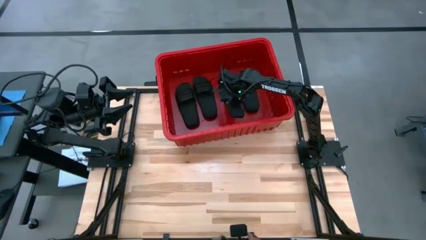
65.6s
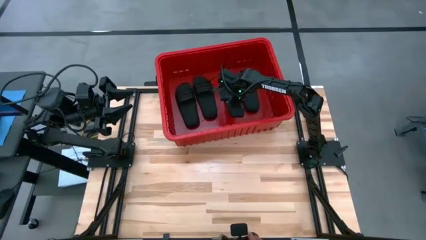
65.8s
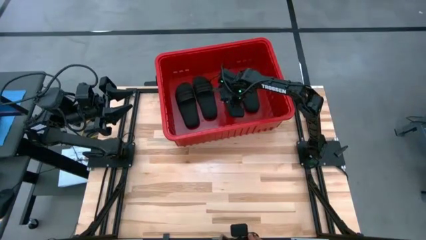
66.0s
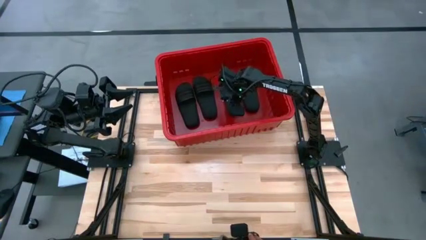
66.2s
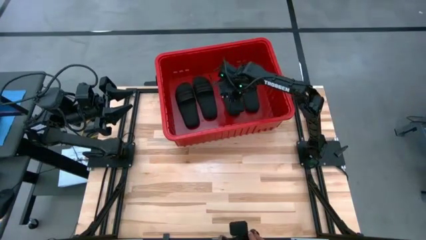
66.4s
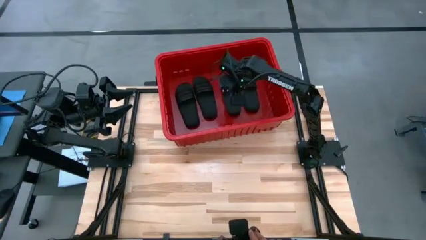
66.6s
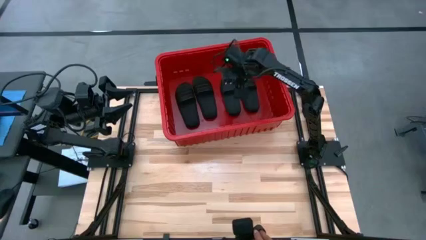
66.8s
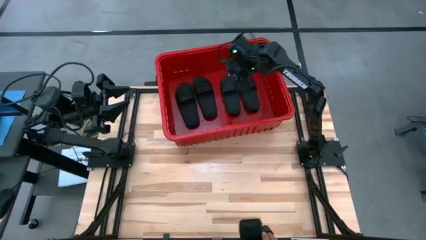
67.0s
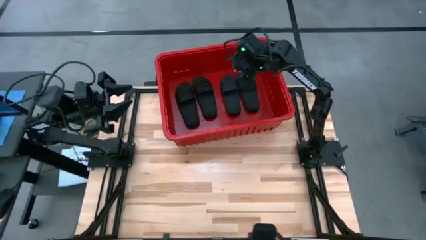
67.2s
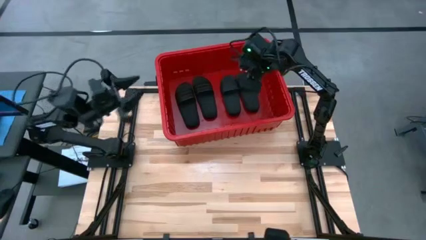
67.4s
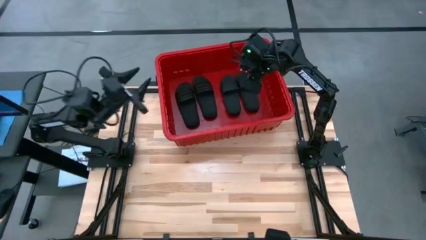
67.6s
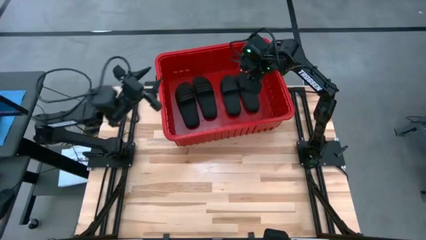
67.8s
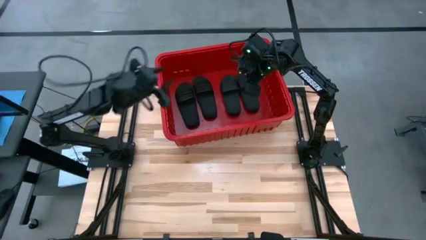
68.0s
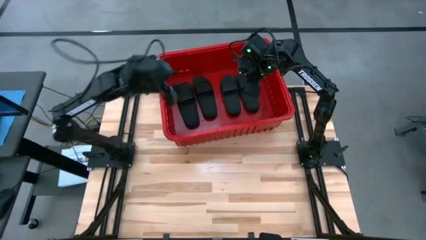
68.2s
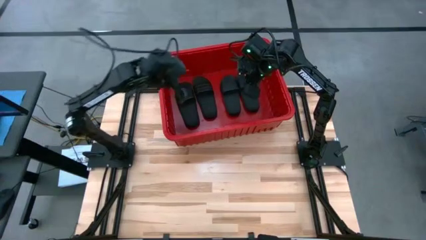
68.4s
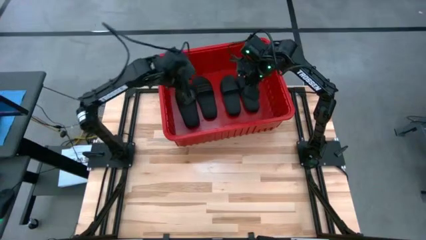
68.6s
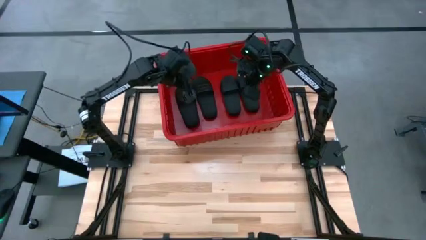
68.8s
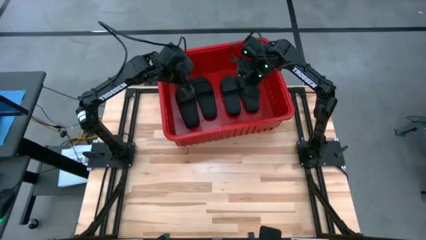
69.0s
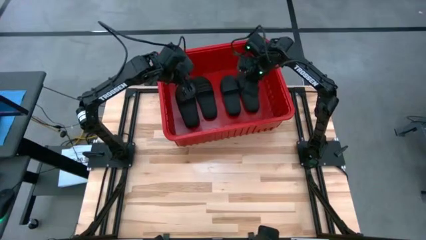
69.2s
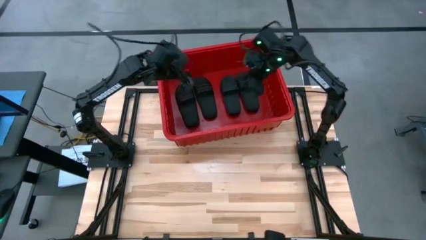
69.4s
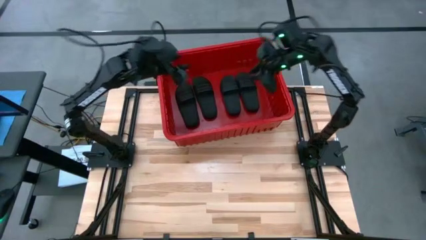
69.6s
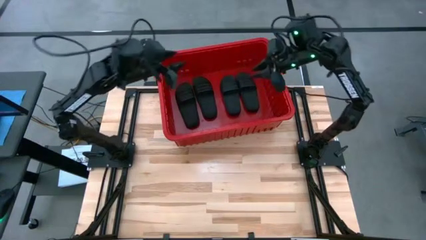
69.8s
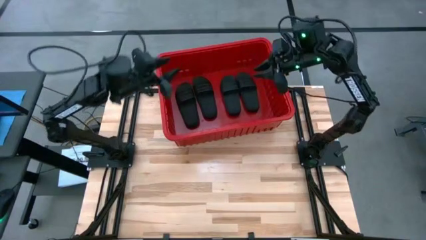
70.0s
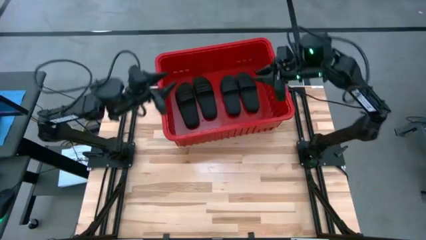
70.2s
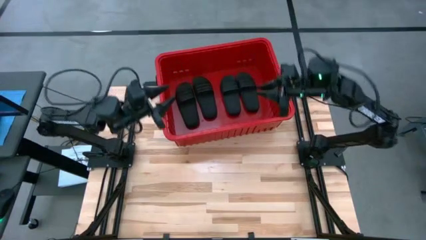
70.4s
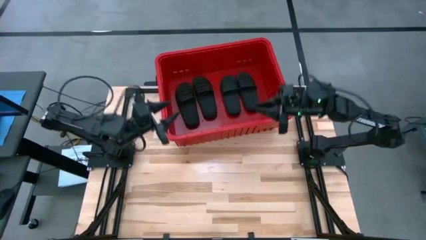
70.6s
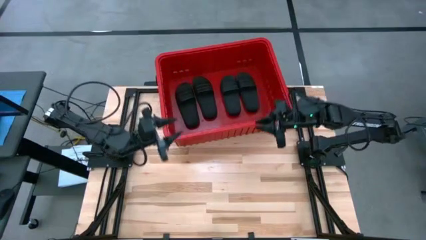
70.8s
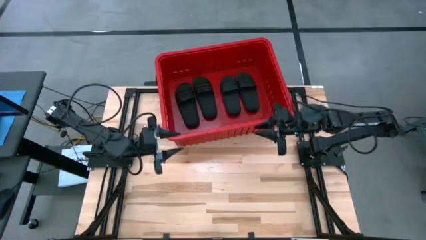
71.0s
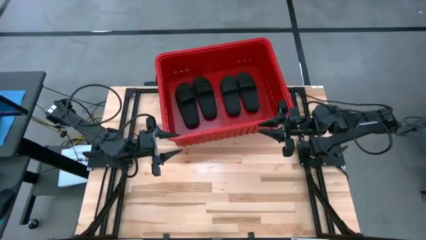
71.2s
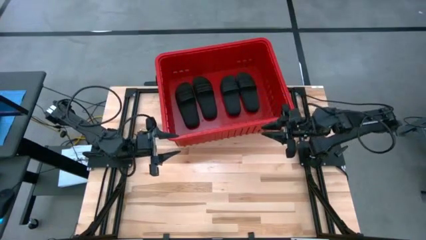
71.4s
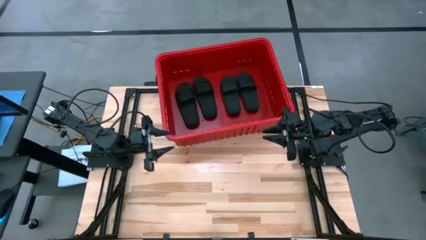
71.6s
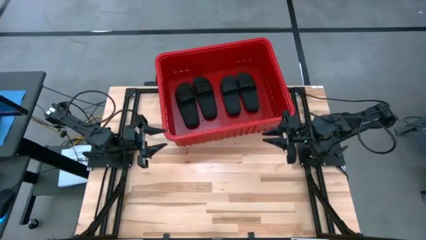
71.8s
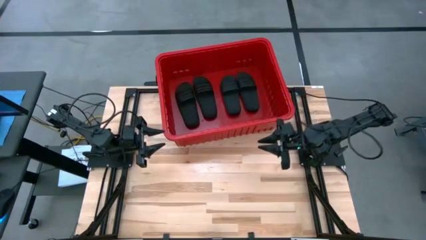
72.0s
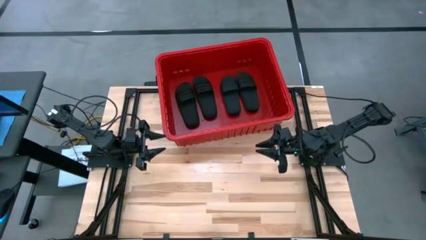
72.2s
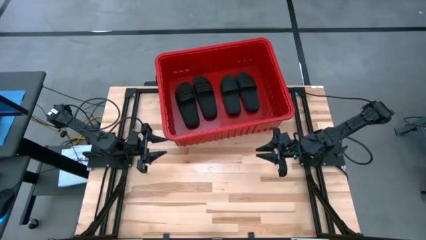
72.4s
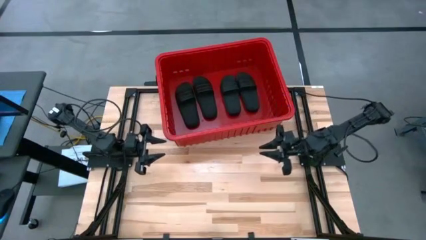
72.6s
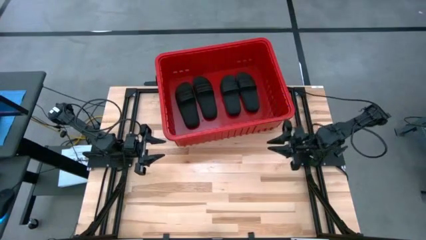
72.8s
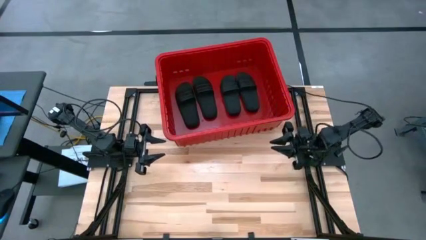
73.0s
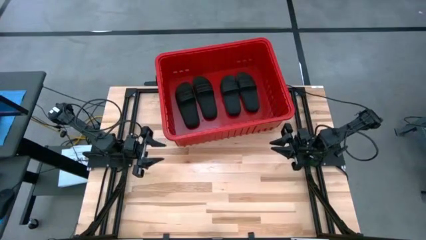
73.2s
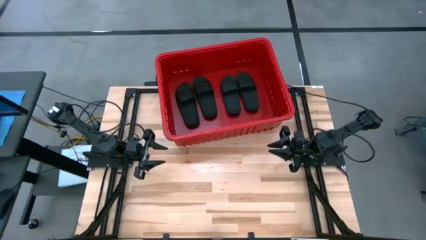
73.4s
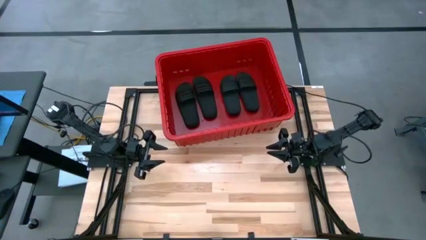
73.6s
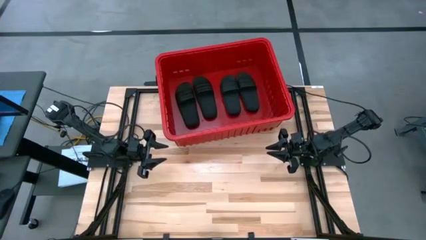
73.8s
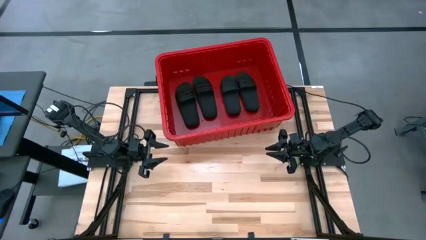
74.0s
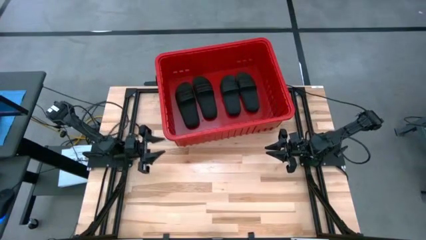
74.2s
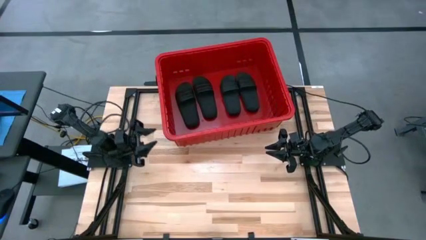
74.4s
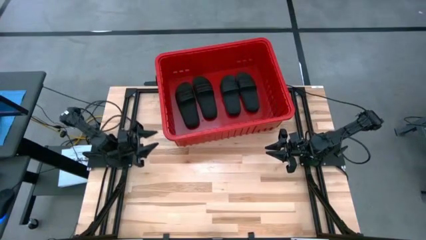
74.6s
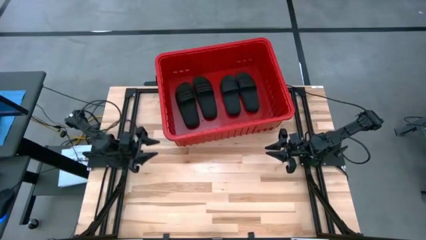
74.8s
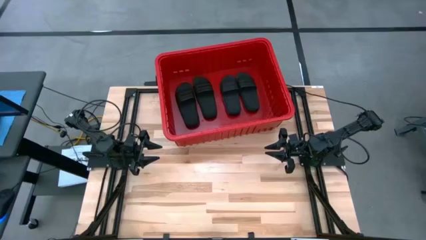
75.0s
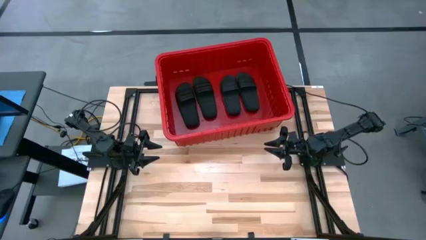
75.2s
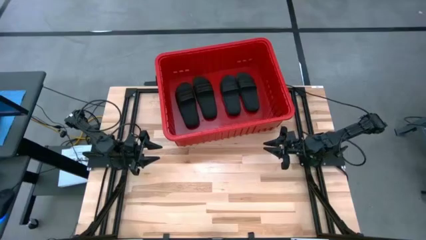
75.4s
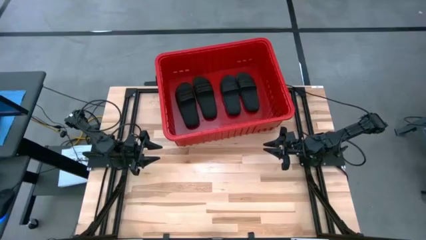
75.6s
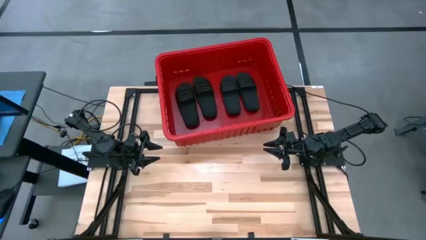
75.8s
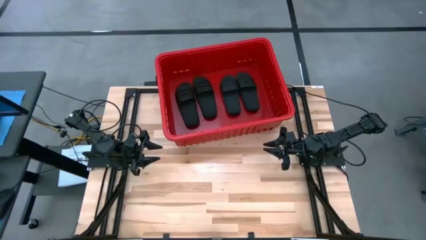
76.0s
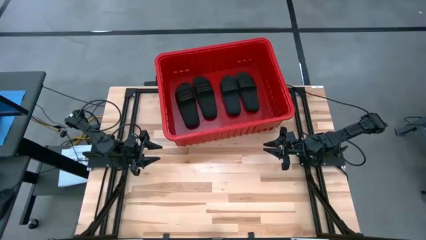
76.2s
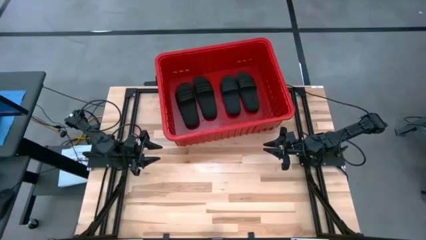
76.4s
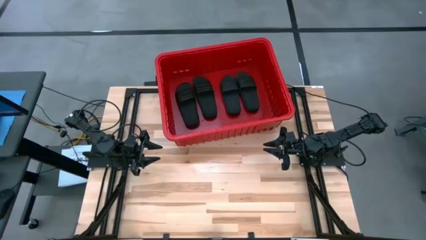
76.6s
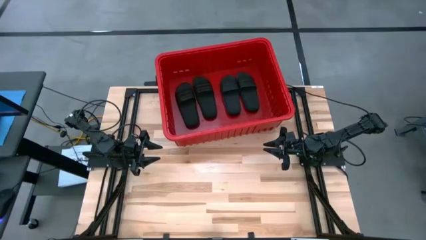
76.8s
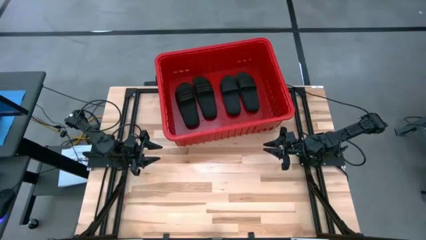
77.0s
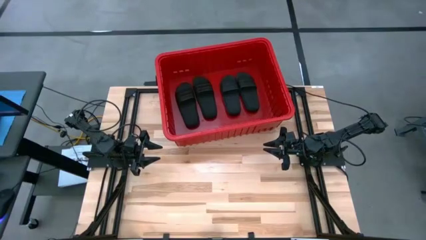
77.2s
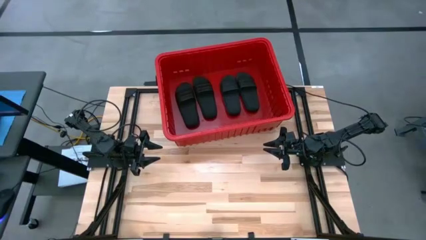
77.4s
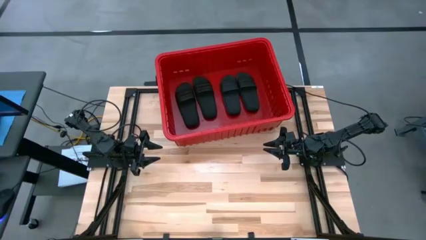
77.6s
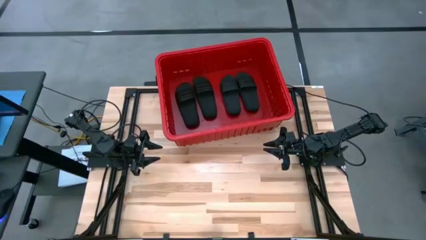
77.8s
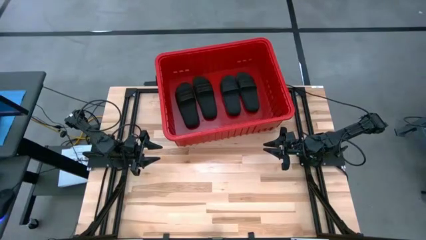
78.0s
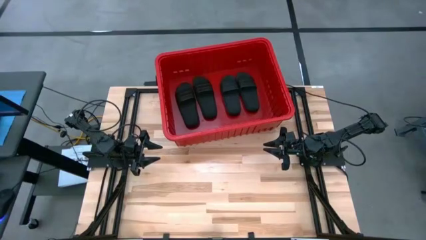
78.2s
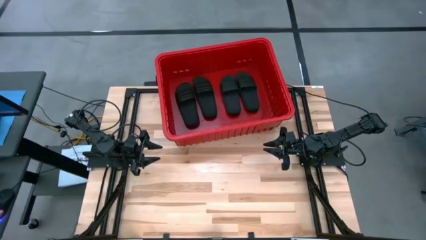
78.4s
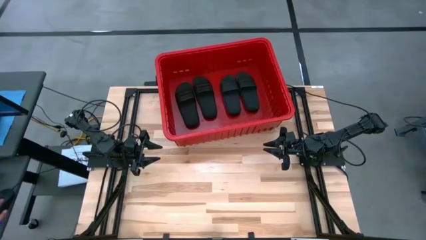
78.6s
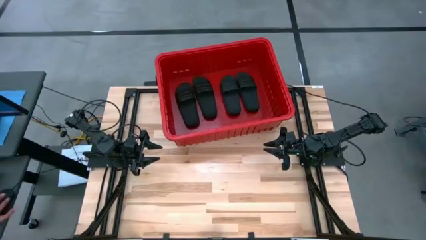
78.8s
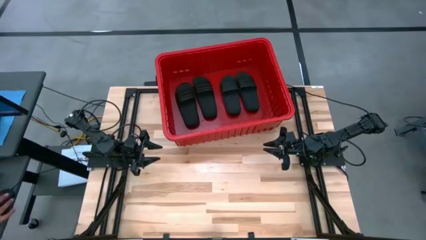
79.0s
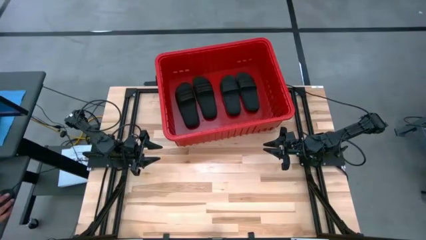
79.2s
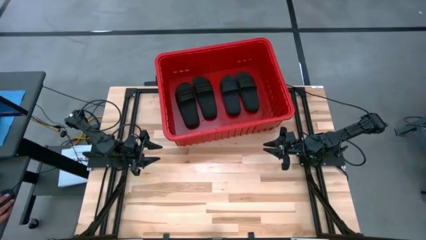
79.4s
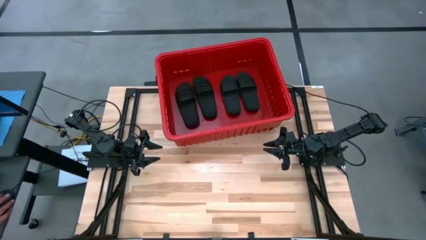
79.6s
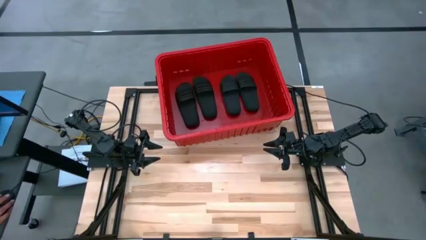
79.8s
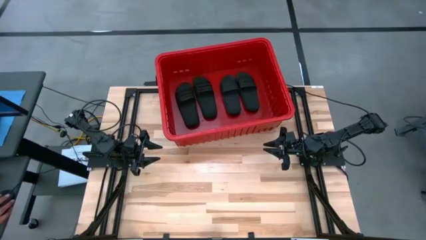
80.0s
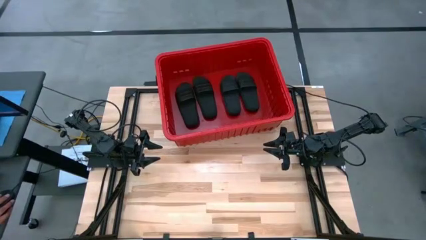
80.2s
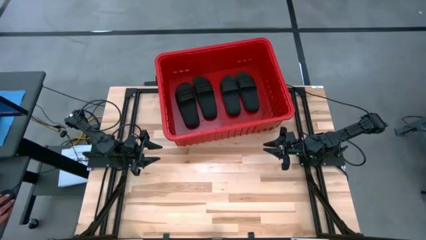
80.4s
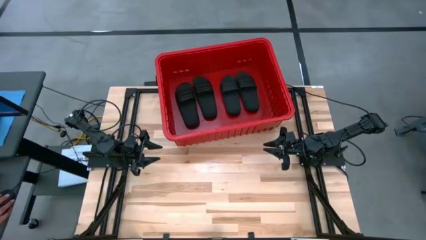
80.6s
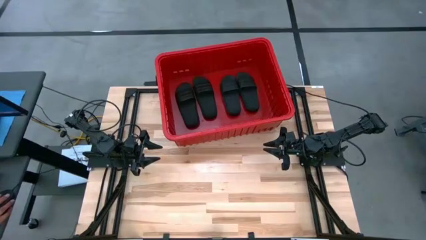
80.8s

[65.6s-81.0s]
Task: Pick and place slides into bin
Return to Home Position
